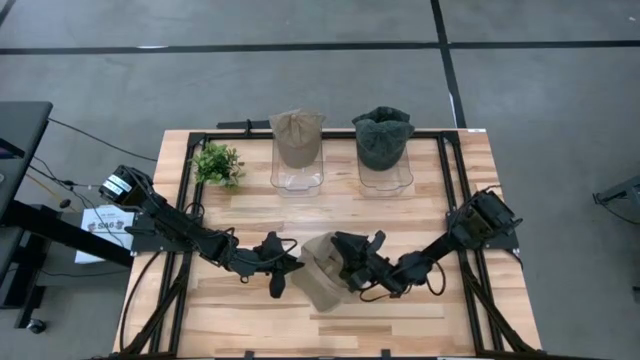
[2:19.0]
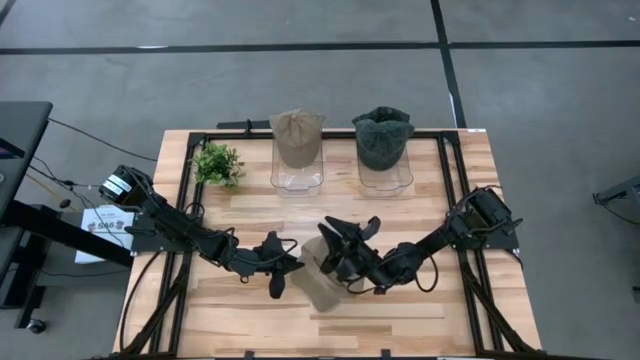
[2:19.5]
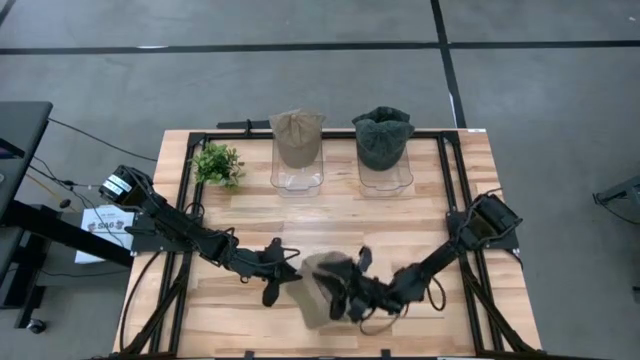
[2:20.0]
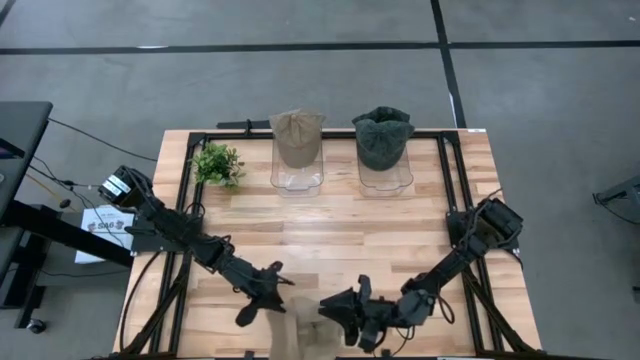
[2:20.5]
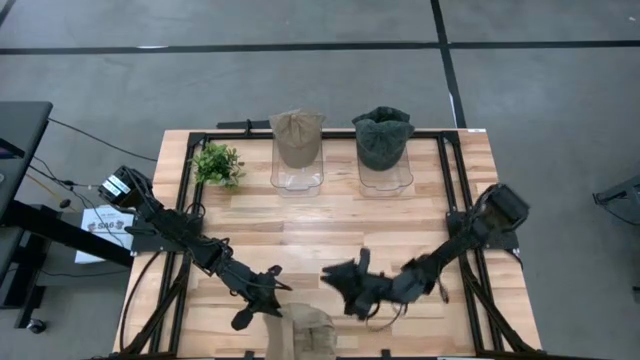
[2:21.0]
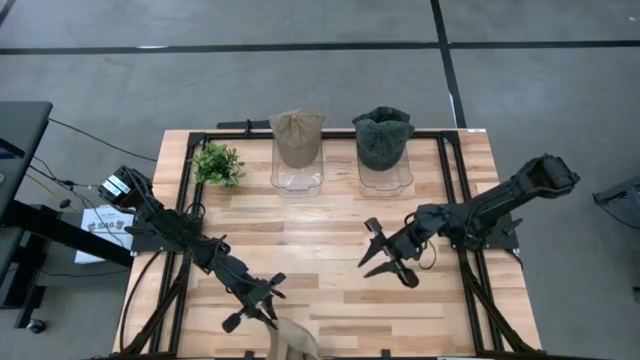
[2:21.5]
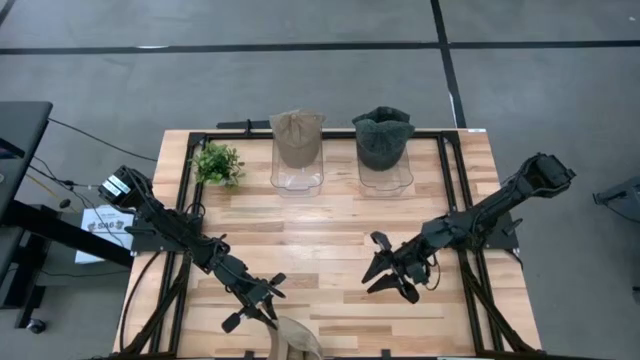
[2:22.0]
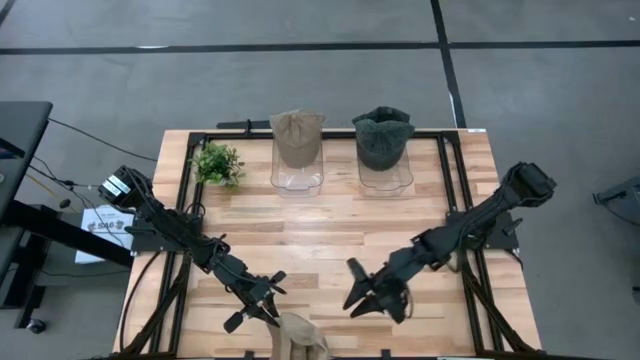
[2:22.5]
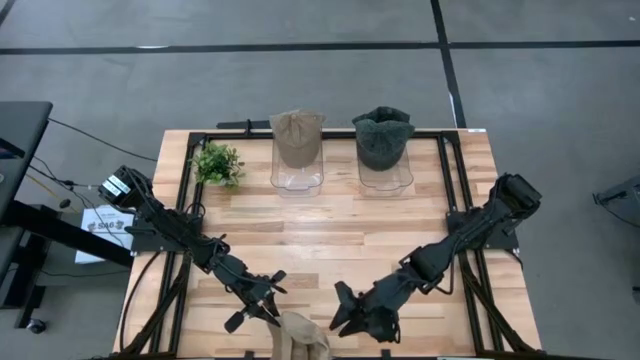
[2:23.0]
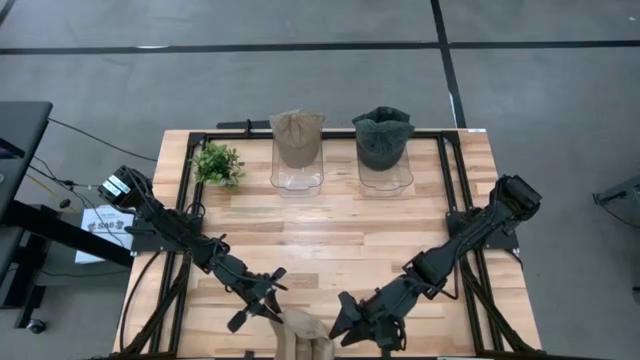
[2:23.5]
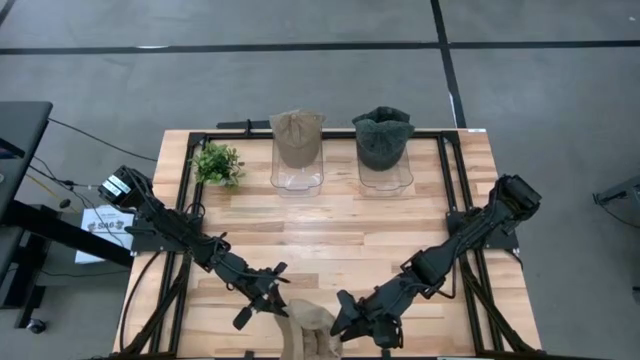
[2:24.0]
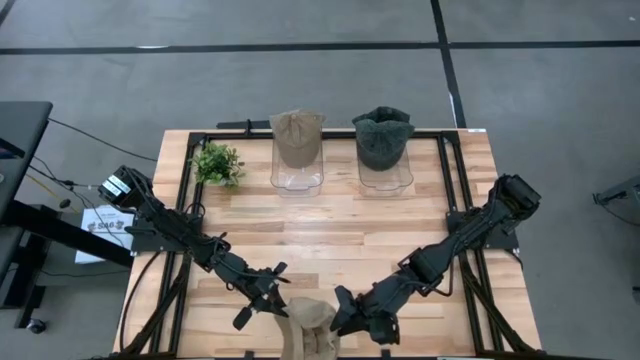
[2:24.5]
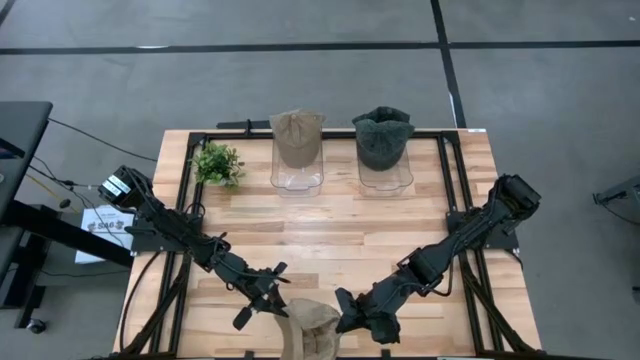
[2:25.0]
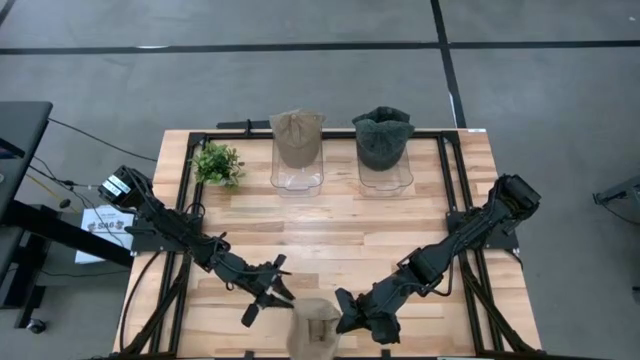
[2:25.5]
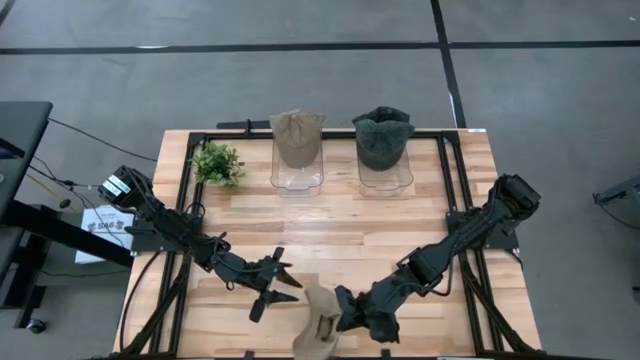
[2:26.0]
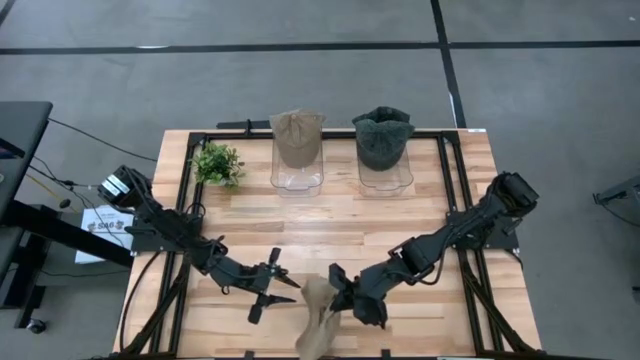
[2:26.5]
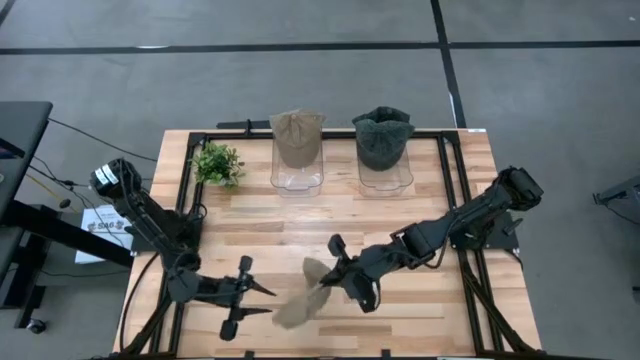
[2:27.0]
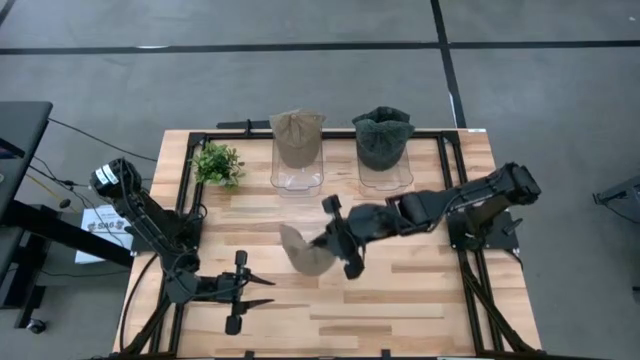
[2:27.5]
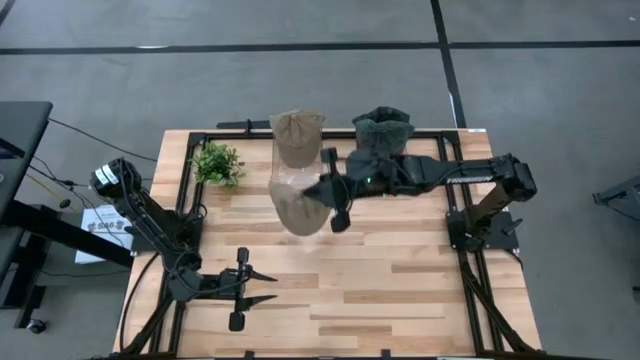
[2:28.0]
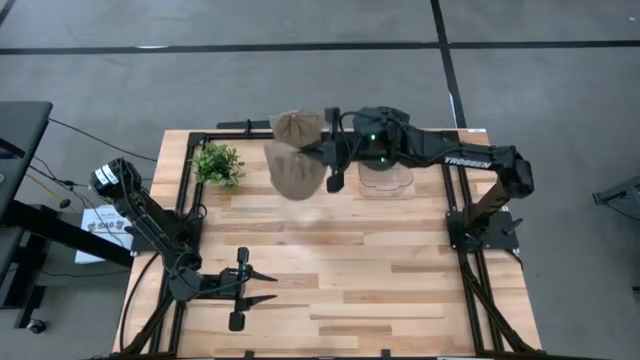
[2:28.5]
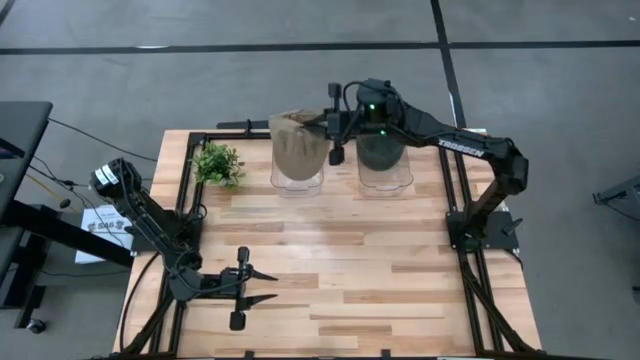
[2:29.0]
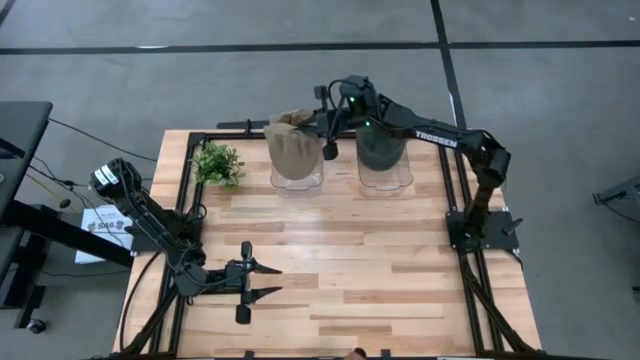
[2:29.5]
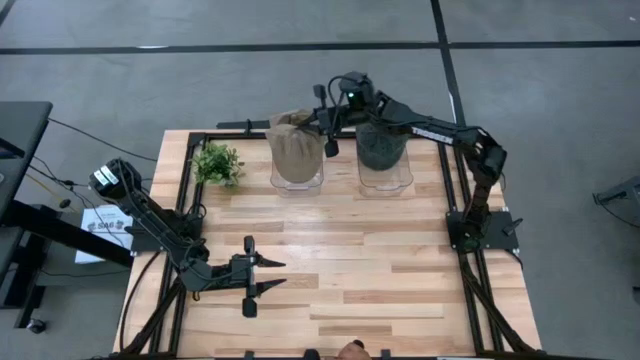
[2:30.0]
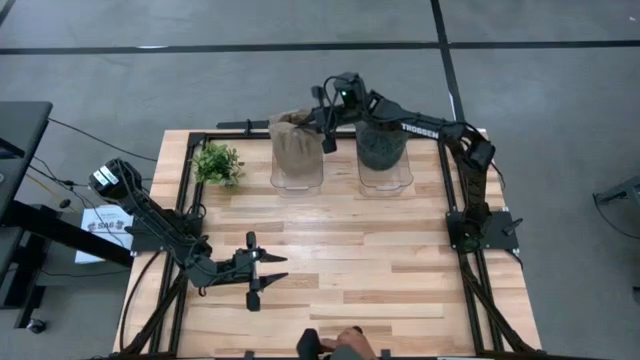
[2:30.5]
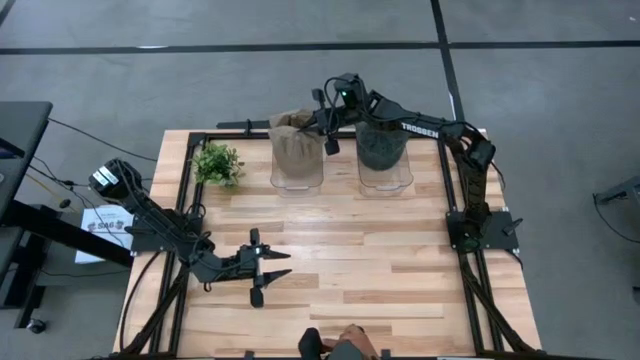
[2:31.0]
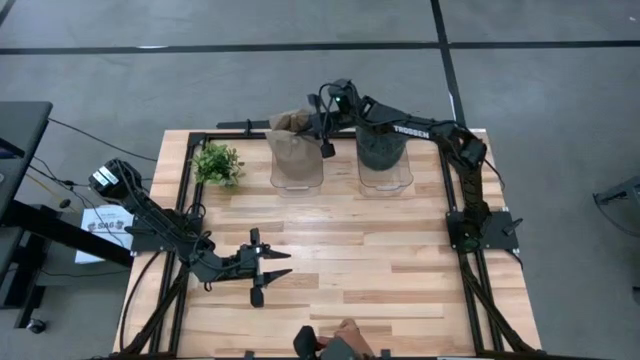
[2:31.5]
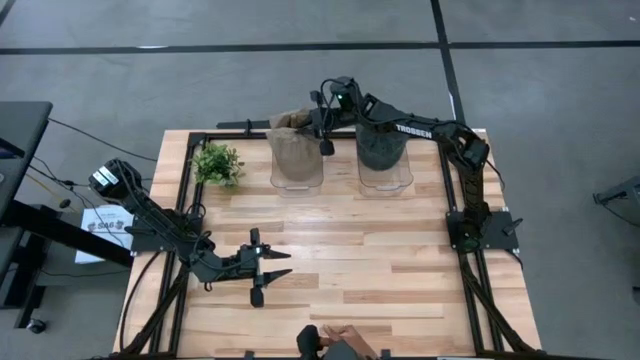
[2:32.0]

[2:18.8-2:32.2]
Task: Pick & Place hat
Put the brown cap into the left transparent bin

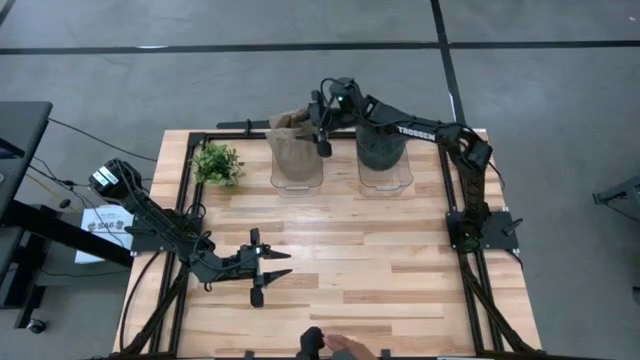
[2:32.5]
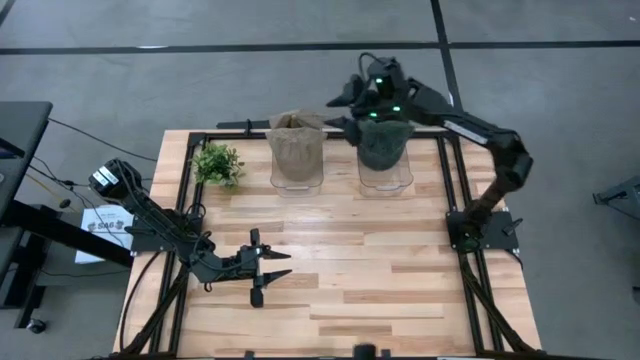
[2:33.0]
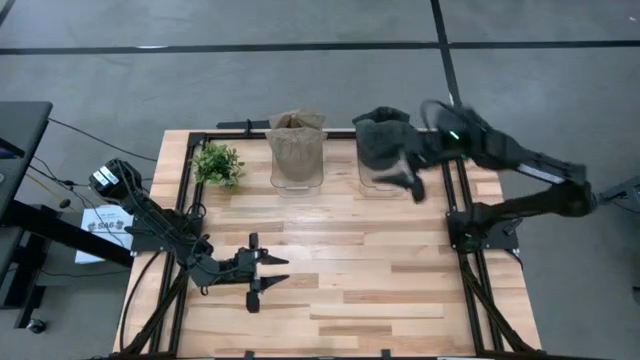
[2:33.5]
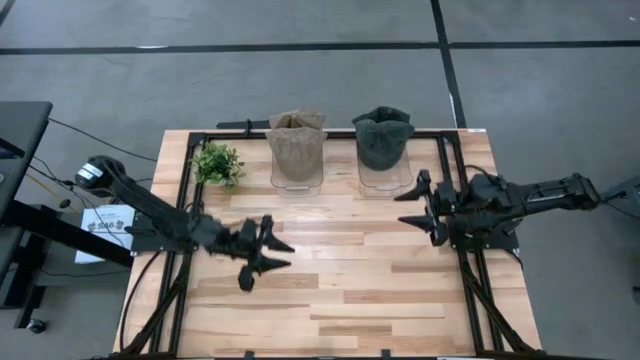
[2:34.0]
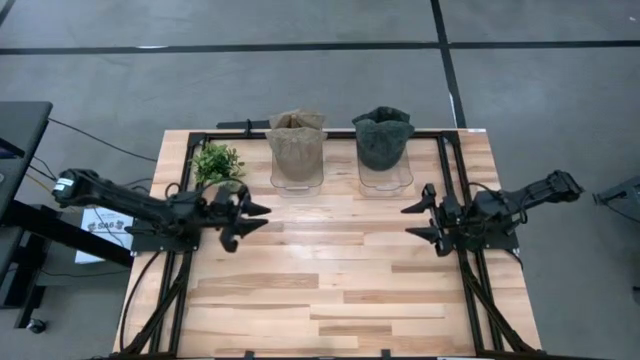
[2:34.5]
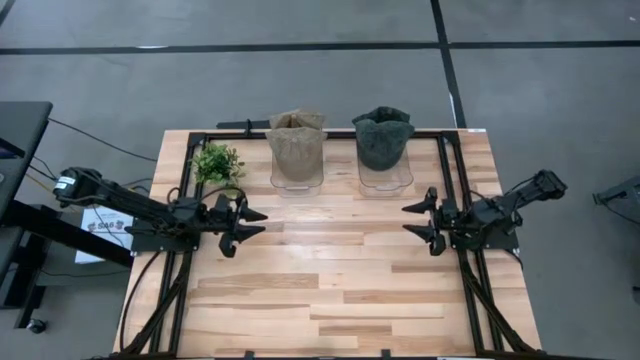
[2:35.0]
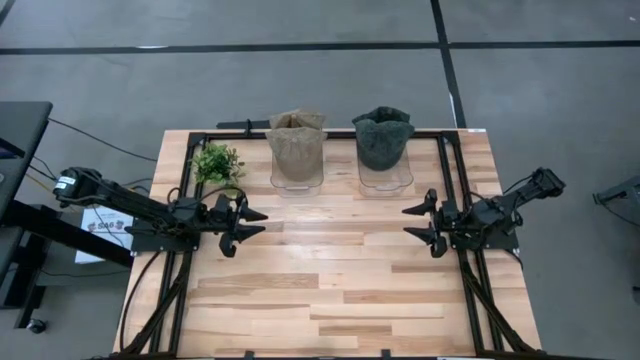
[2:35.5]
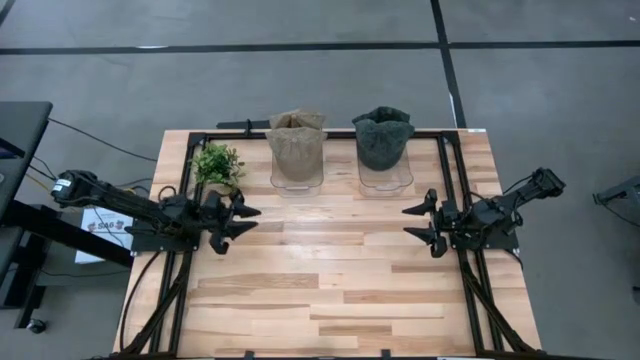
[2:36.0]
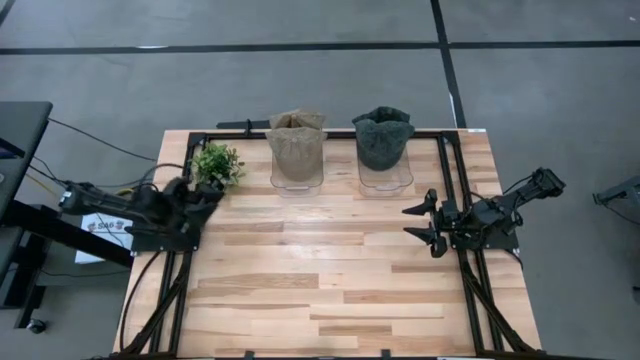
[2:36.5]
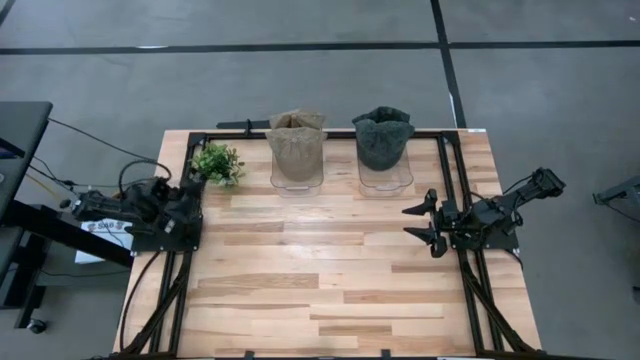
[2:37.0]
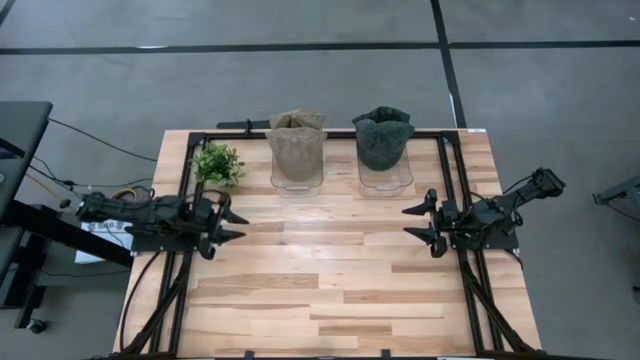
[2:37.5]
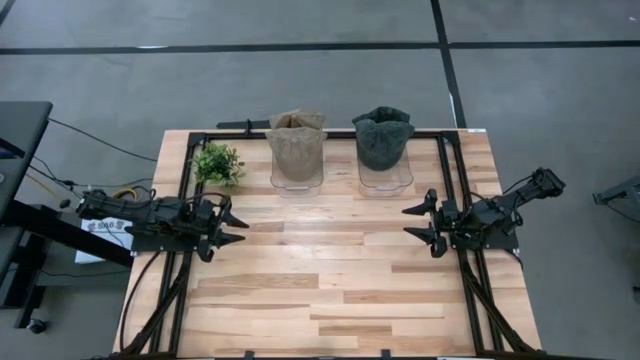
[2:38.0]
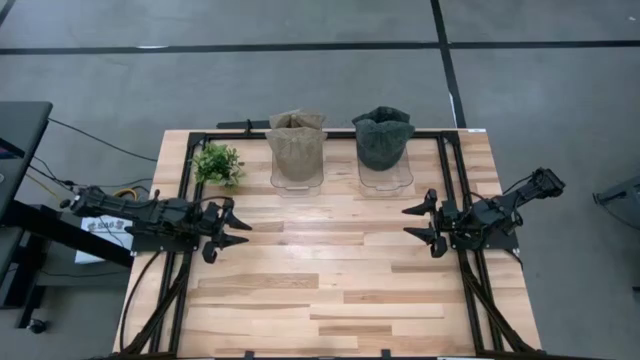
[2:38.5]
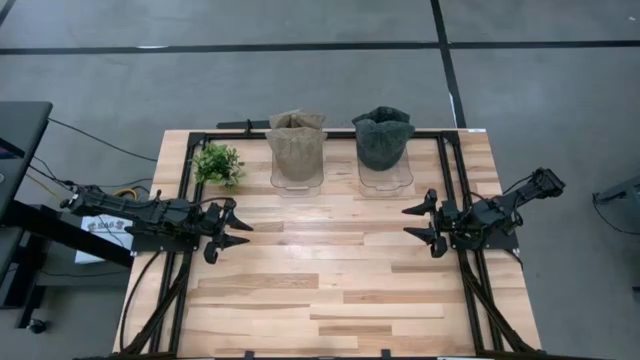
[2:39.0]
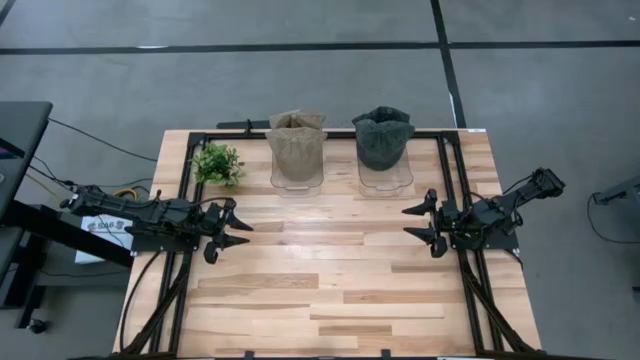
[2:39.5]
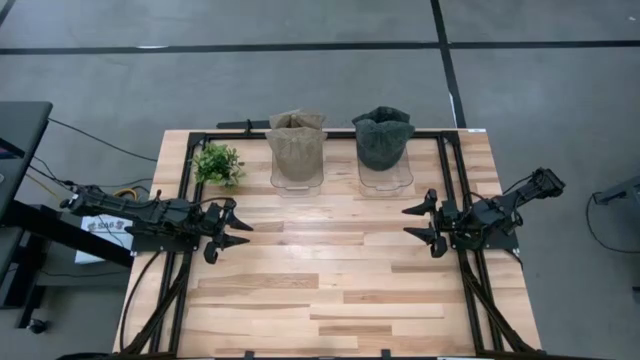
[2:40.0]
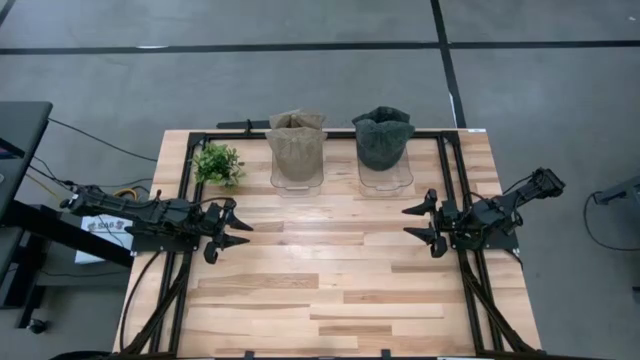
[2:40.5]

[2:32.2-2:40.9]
Return to Home Position
